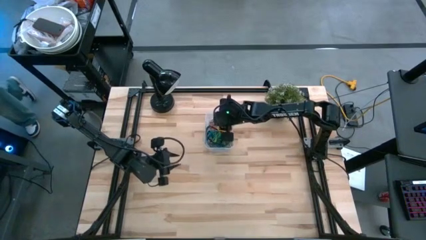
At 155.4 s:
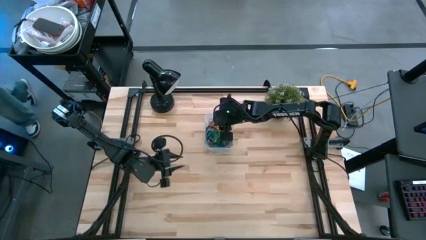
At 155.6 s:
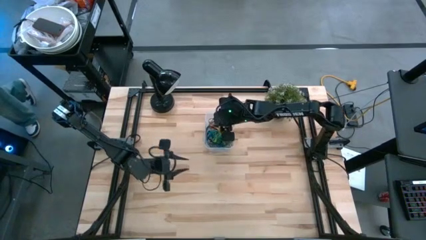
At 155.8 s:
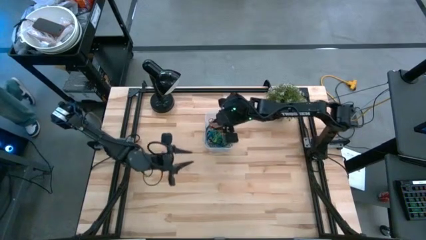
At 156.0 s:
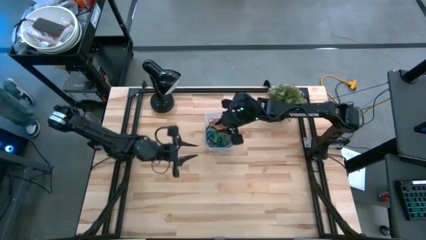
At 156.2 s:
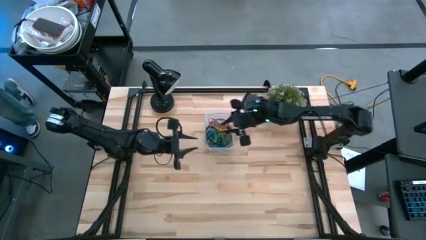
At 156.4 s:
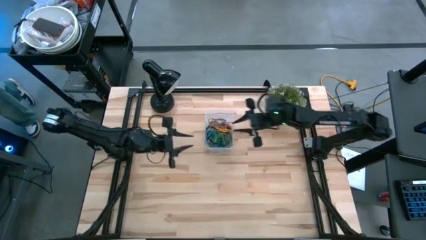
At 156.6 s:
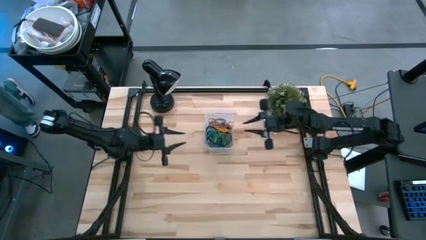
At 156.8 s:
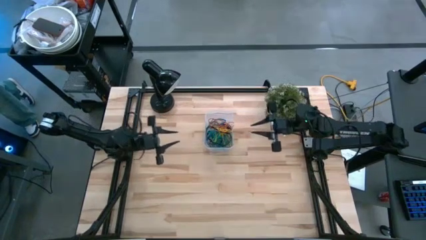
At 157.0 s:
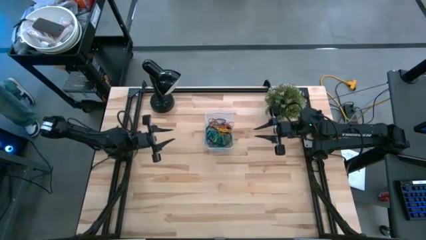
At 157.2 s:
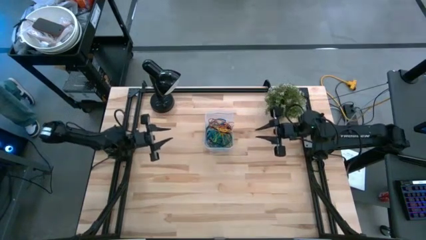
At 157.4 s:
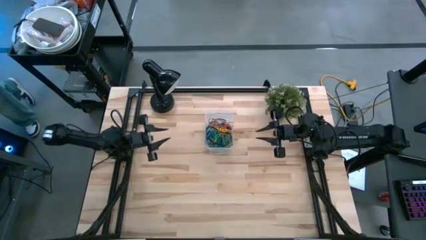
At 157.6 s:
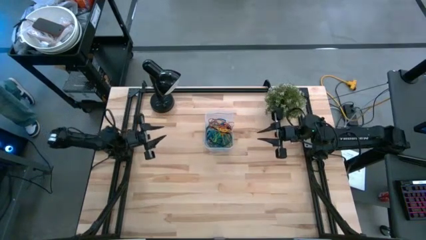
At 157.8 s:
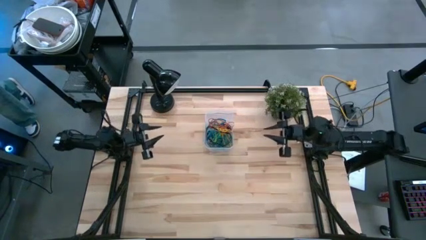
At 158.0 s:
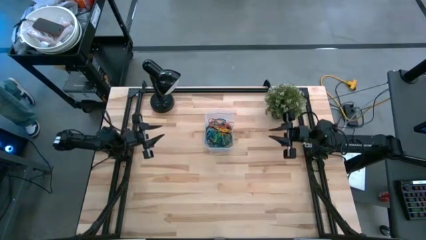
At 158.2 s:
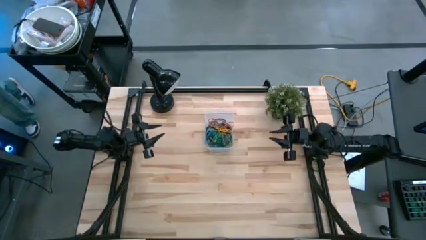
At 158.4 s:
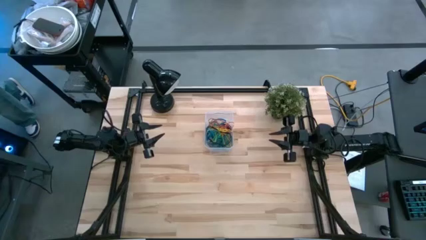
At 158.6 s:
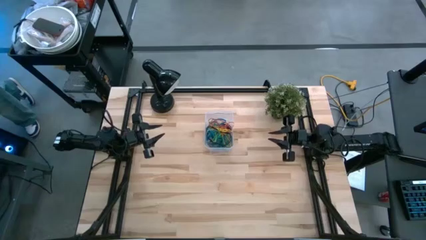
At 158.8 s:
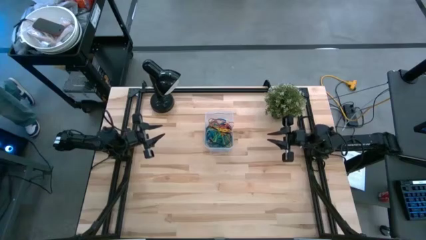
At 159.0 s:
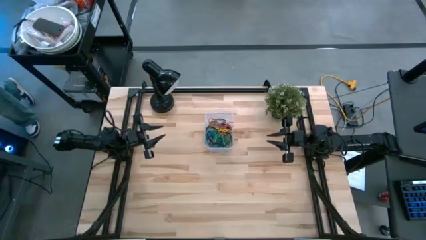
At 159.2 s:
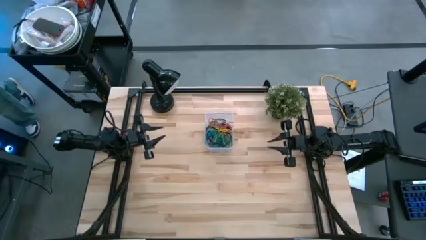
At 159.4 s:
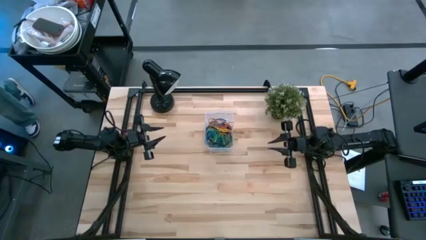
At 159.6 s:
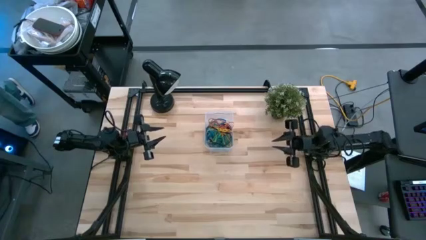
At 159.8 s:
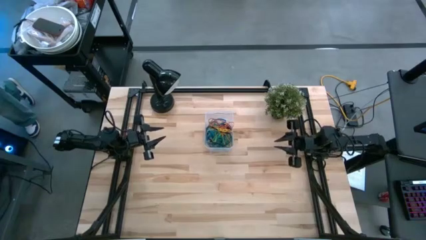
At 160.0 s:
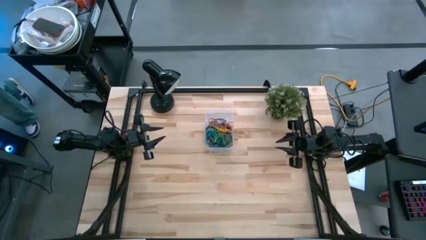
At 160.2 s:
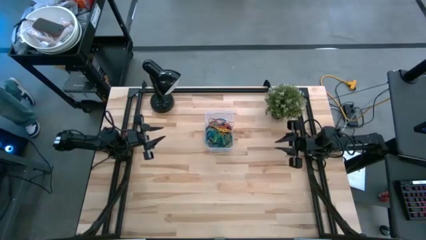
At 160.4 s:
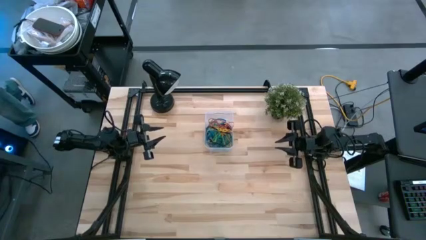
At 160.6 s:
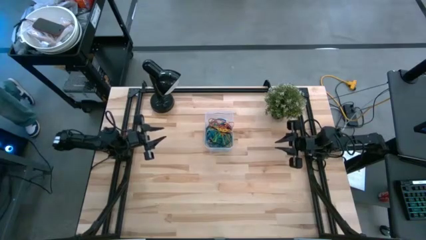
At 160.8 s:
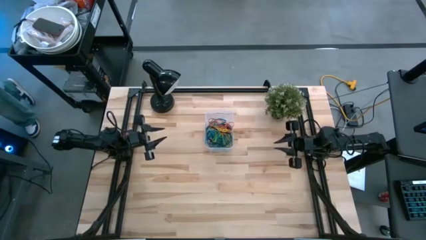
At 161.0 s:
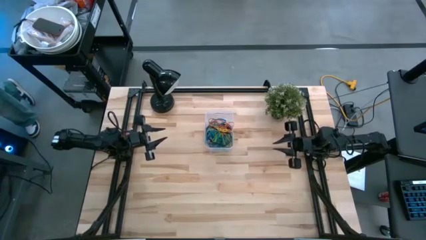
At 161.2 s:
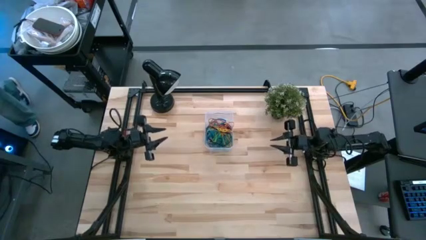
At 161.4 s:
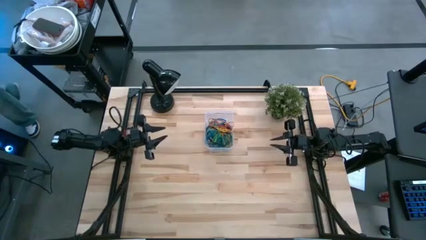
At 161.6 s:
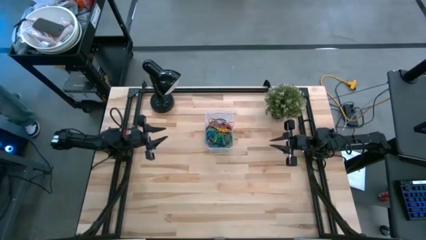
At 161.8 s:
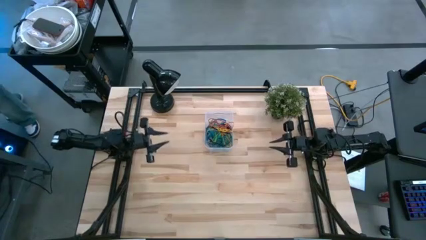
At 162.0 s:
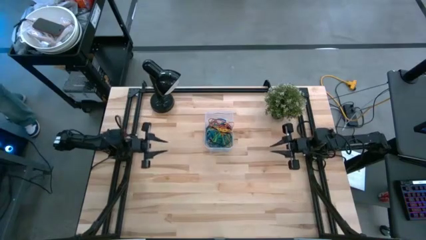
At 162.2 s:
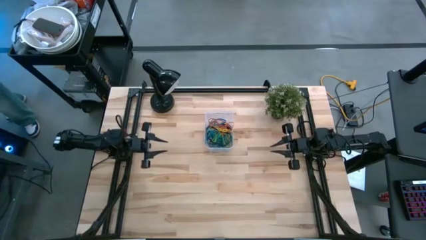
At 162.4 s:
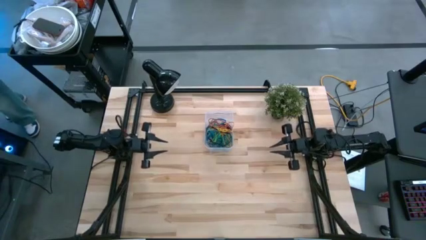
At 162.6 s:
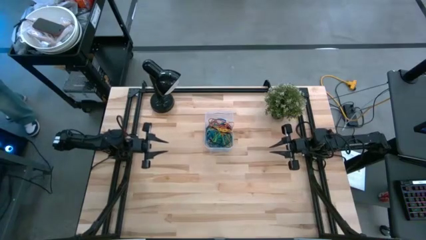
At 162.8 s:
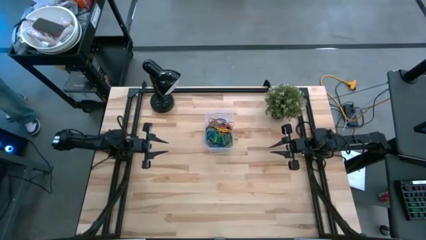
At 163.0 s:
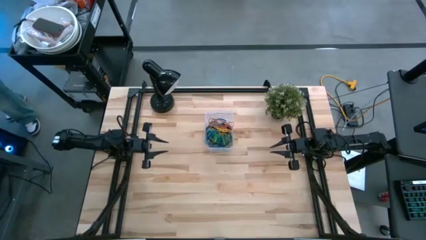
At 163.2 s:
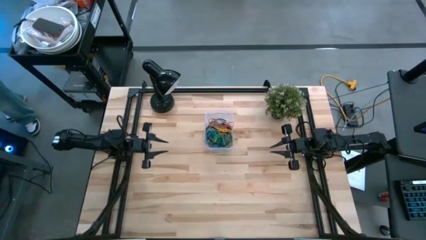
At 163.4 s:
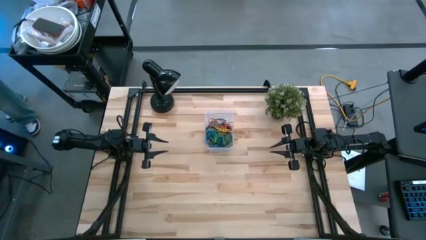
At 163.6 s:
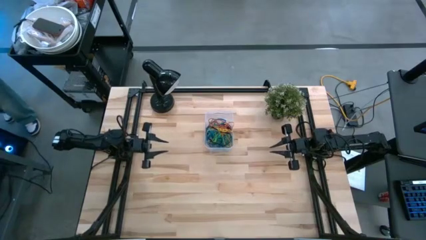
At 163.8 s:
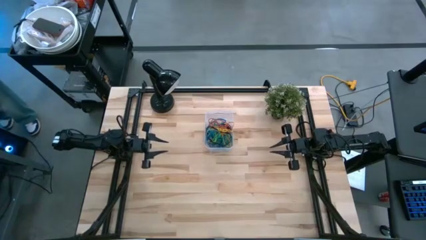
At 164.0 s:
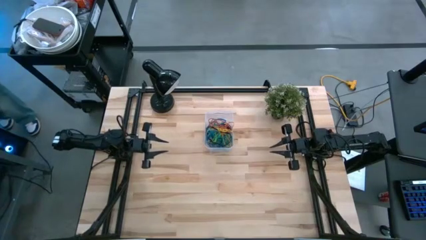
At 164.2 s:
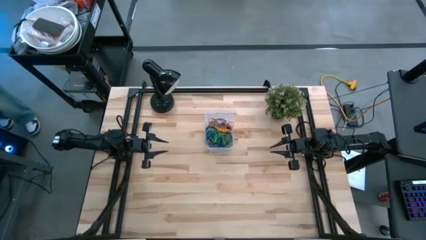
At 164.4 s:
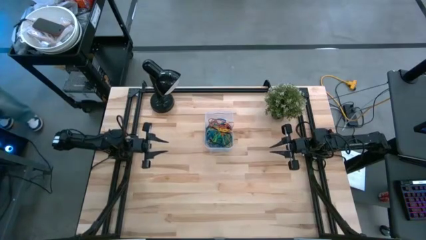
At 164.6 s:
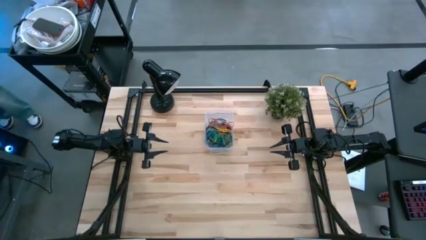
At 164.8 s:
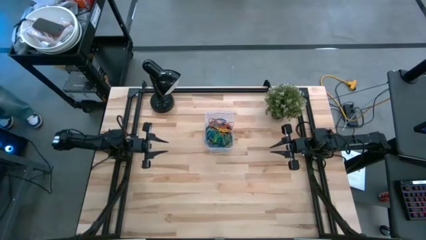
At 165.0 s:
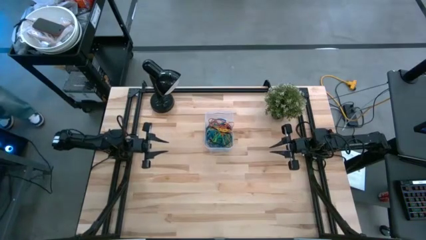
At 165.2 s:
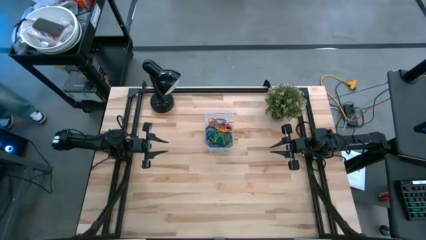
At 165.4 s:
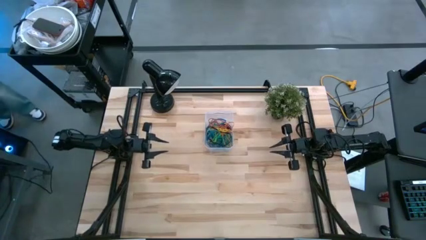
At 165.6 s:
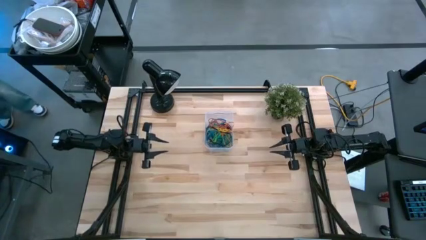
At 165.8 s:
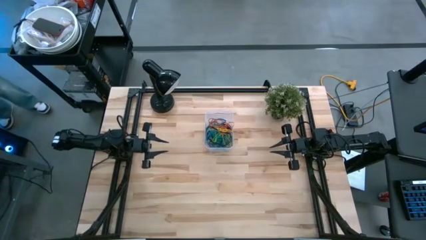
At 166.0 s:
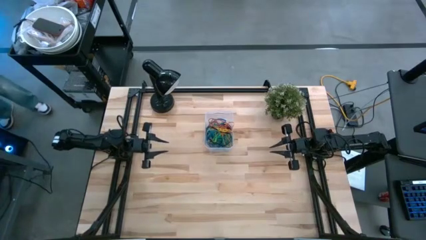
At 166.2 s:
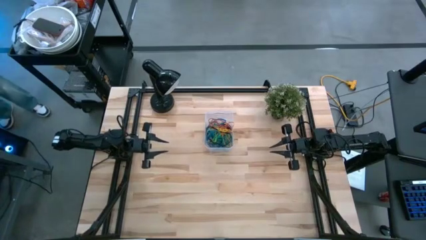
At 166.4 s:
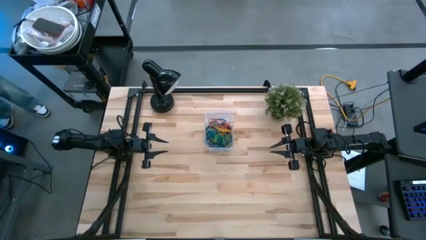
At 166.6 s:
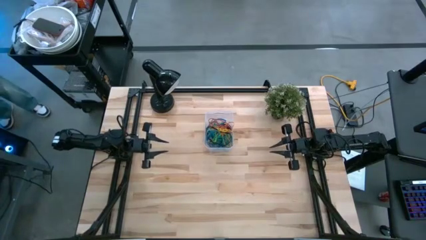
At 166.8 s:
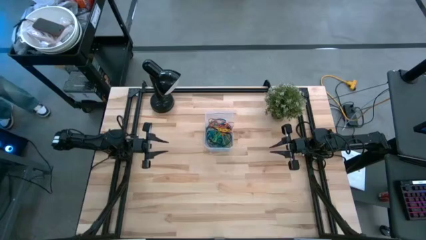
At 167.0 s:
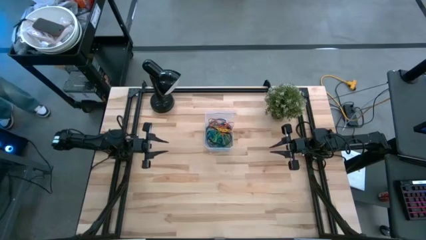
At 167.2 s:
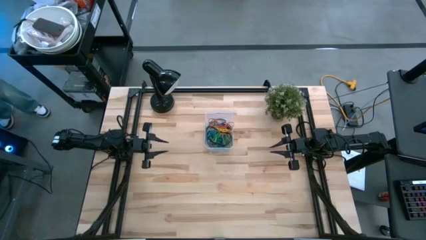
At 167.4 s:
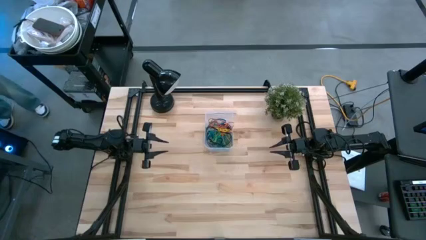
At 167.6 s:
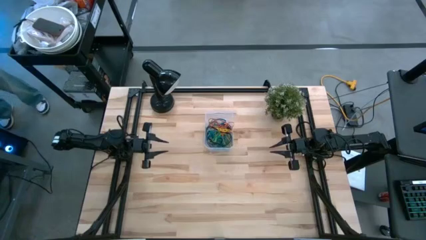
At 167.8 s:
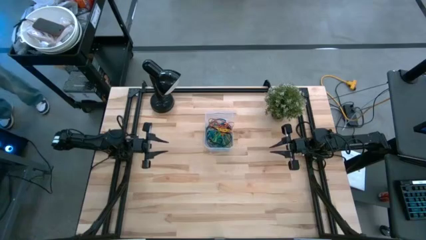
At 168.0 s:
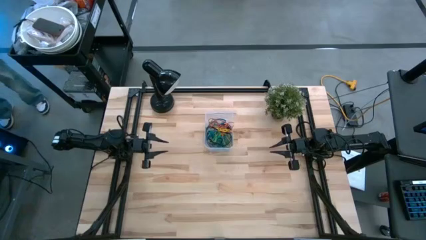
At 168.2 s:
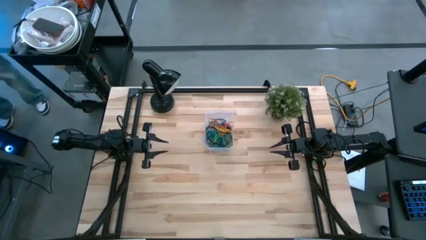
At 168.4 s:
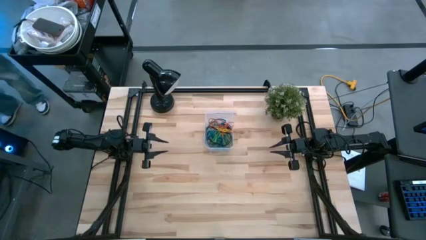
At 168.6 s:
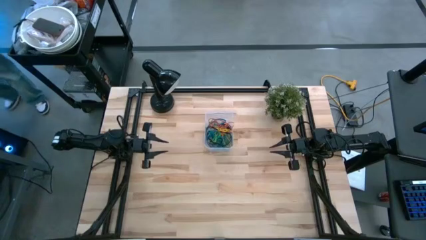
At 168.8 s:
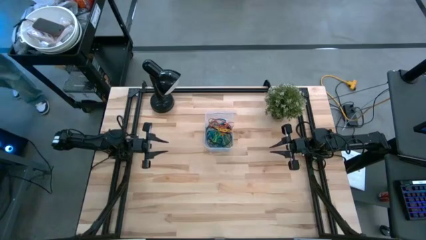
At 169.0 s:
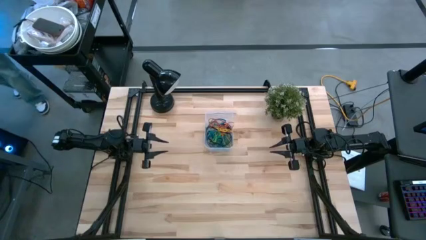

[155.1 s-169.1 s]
Task: Pick and place rubber bands into bin
Return to Home Position
